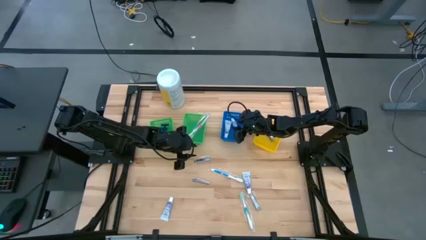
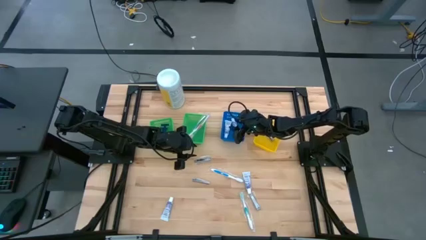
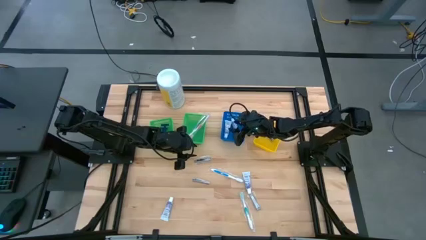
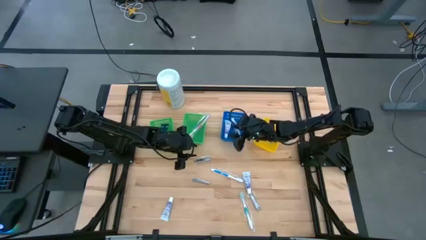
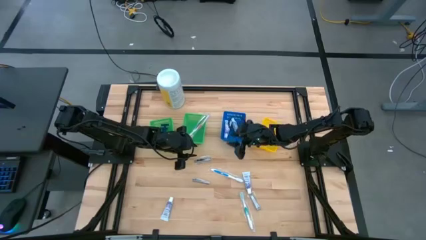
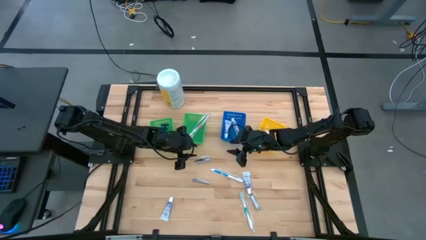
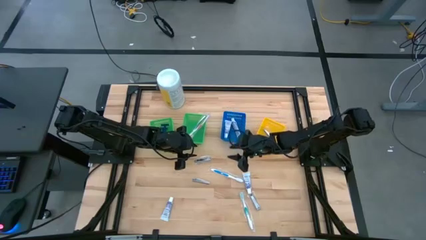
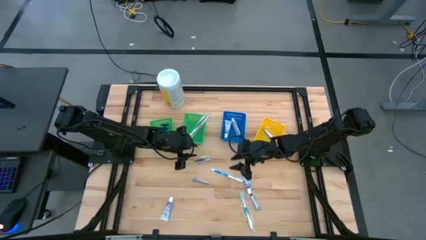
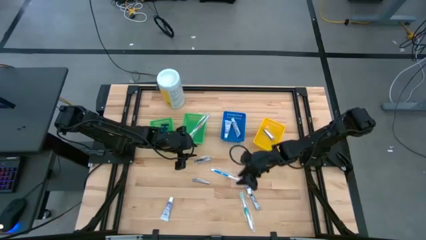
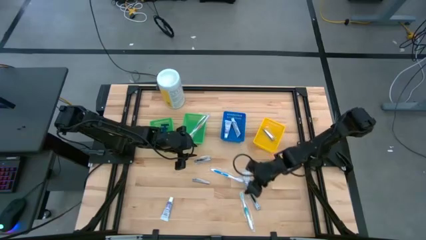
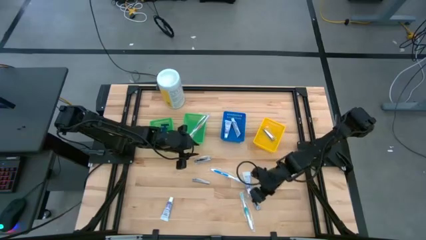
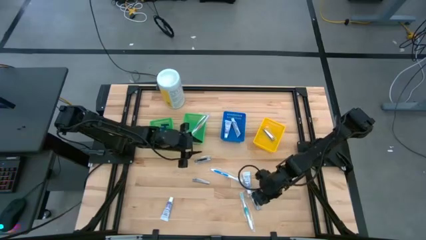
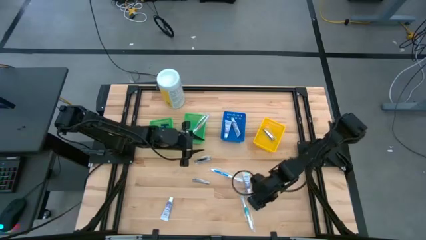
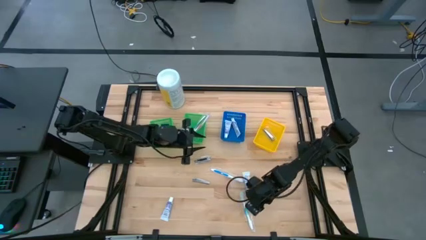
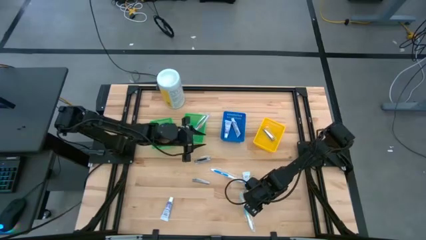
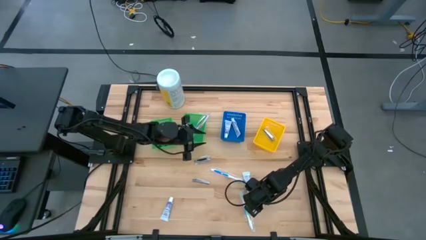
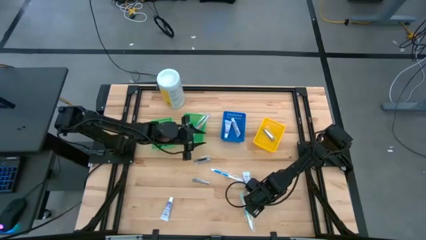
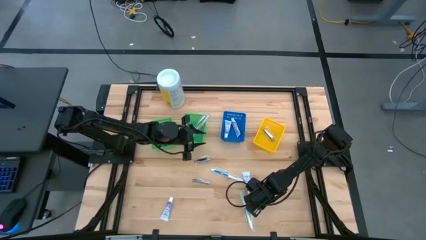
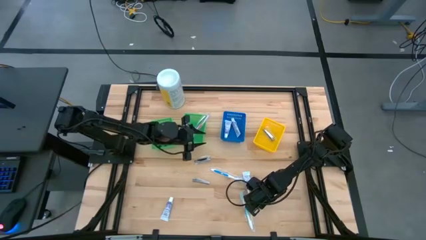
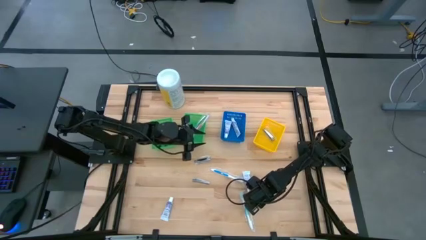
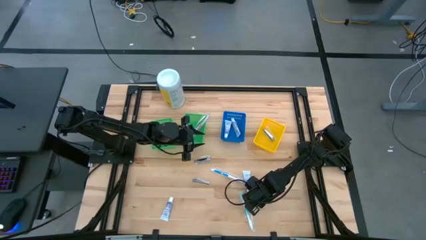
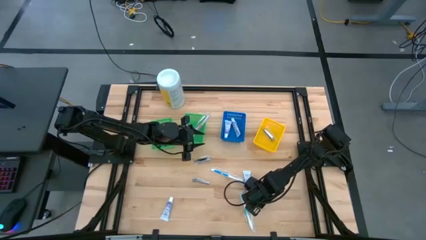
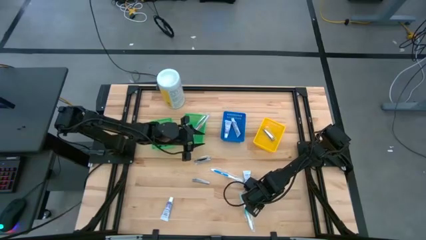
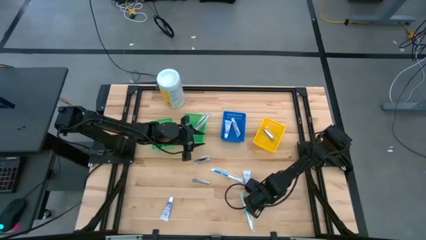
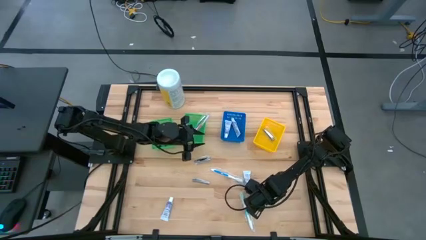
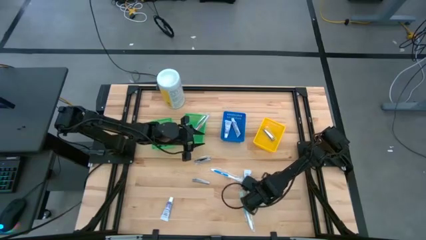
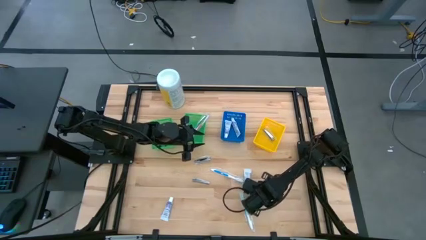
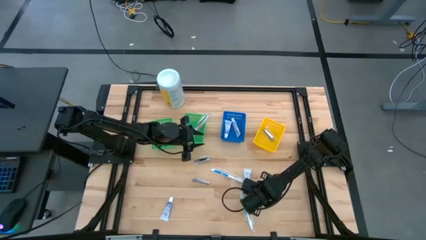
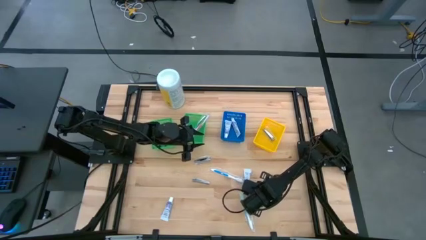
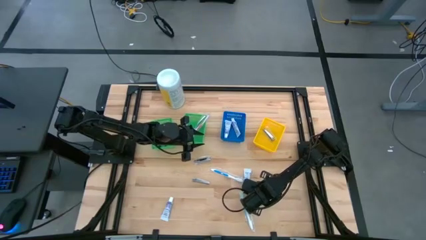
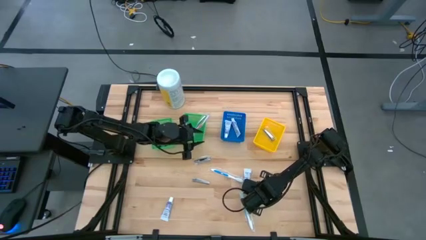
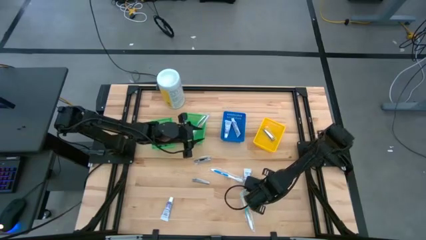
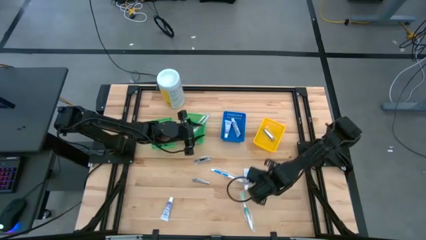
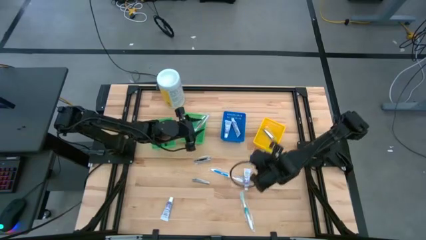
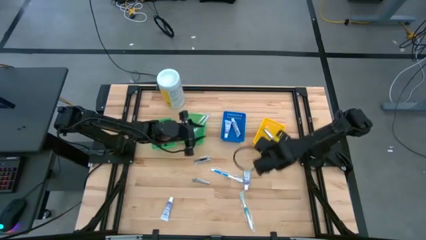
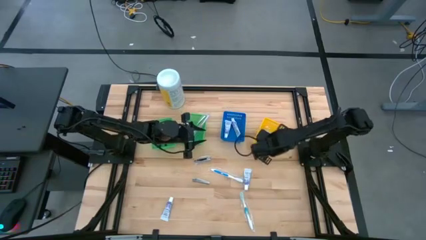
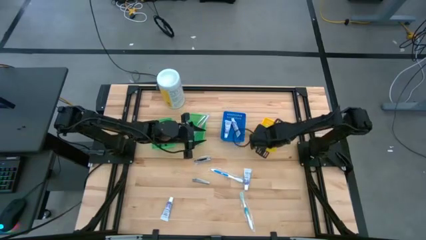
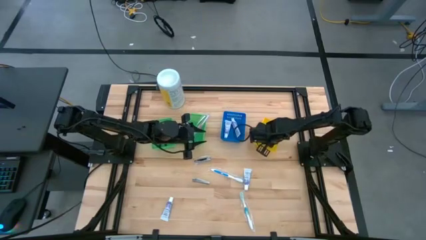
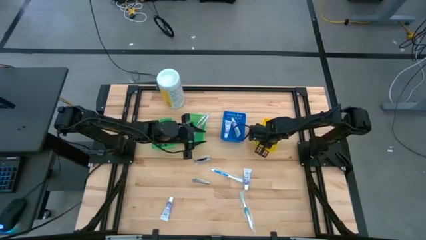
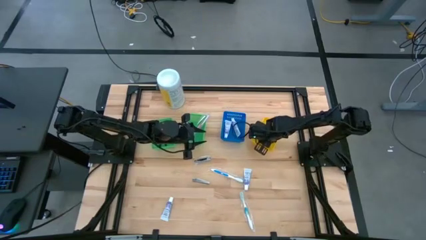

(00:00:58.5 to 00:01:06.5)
Task: Pick & Place Travel size toiletries
Put the silver nail cutter into the yellow bin

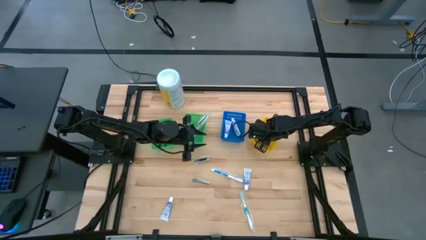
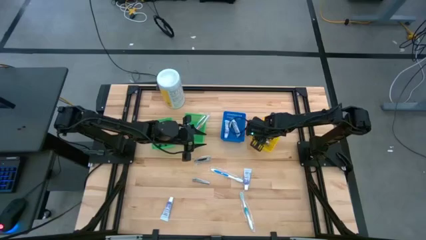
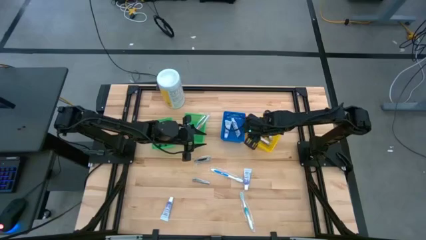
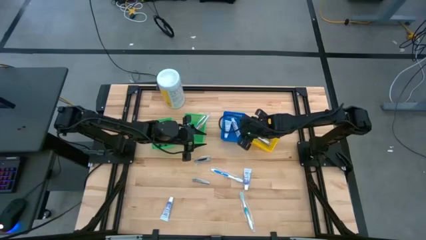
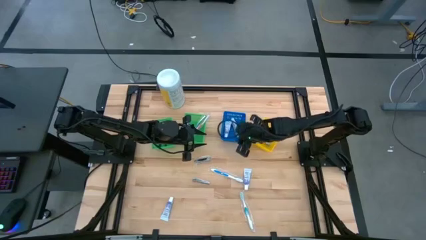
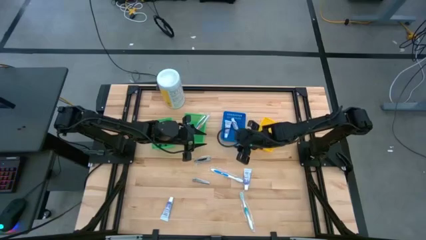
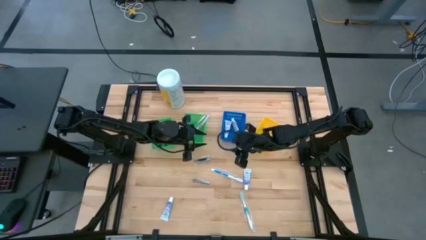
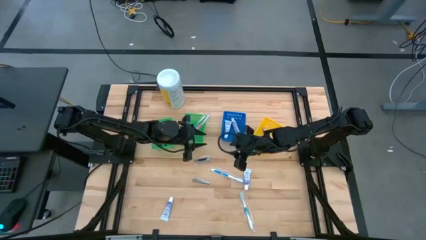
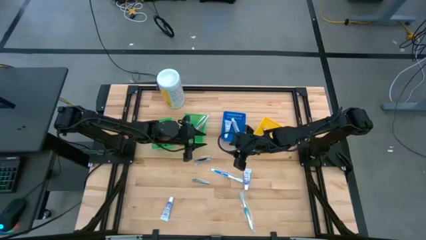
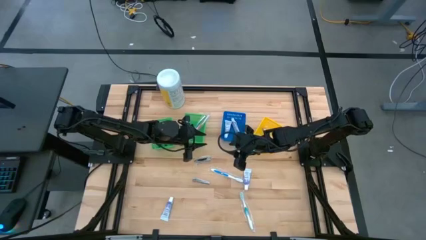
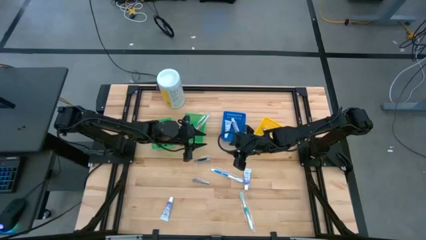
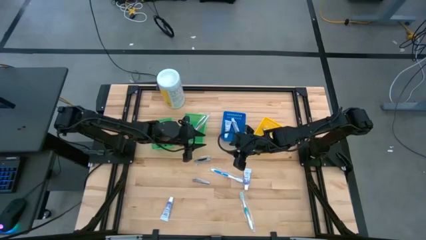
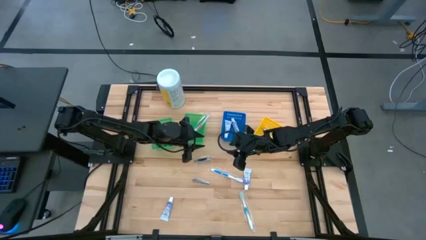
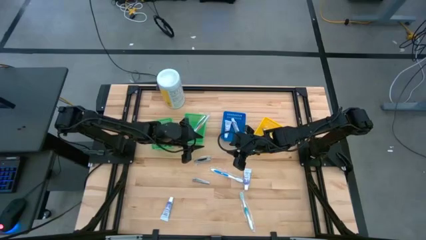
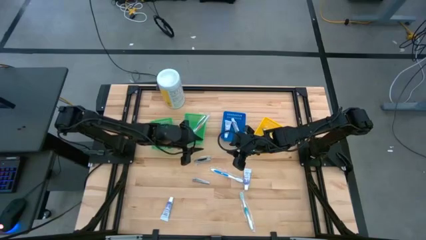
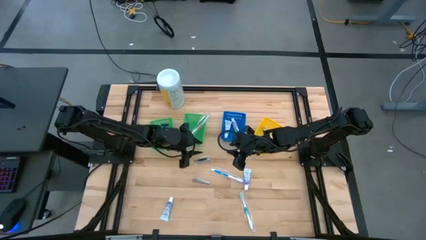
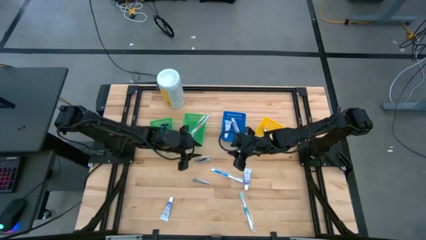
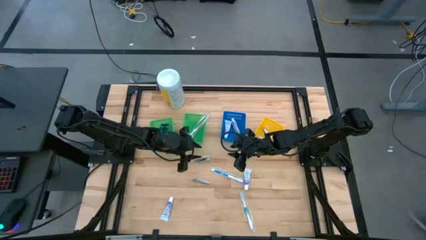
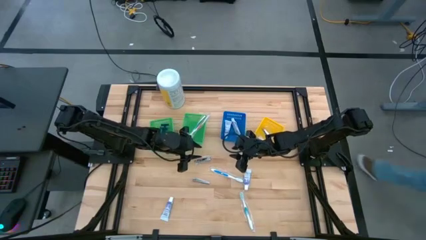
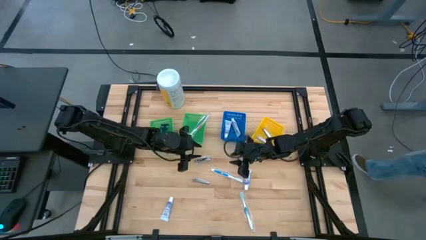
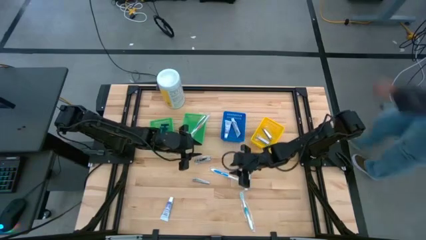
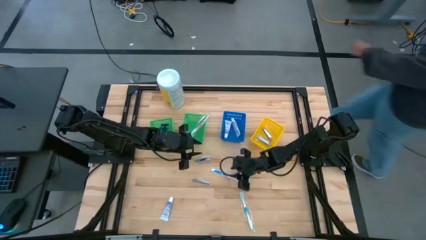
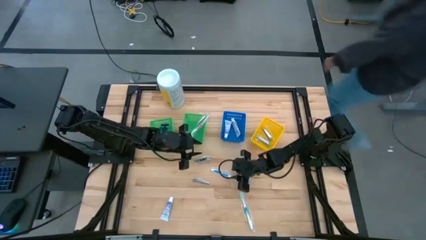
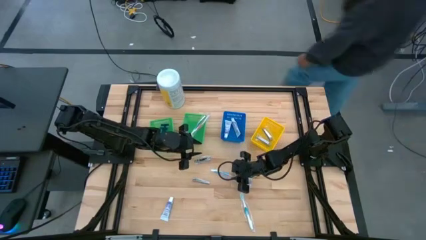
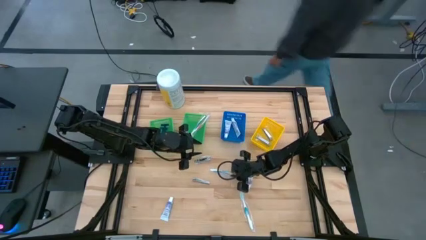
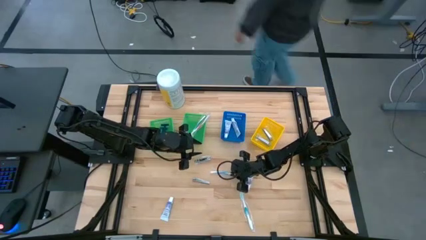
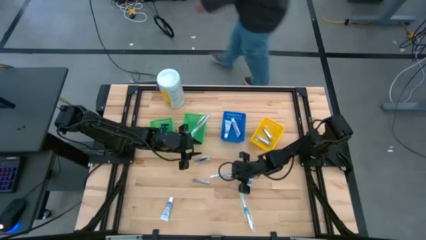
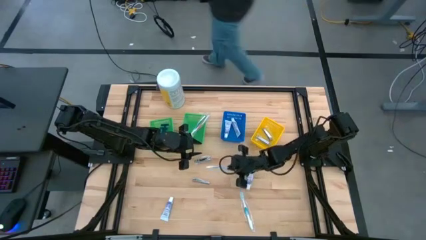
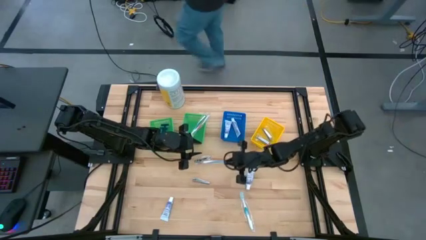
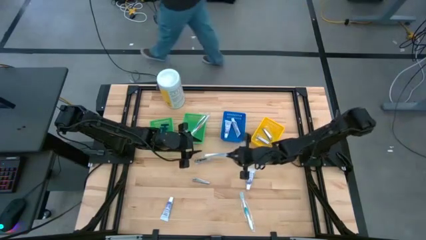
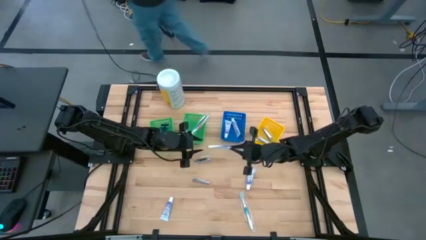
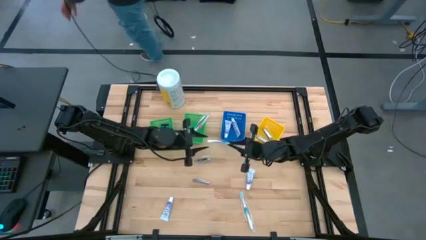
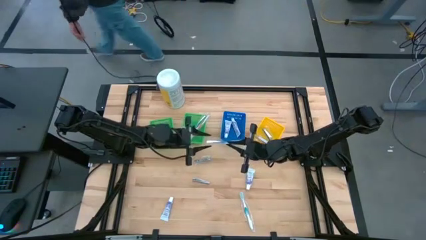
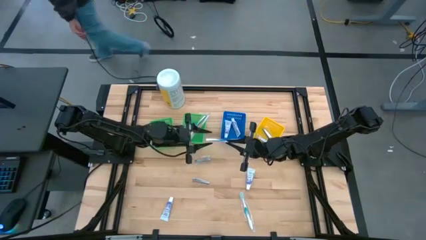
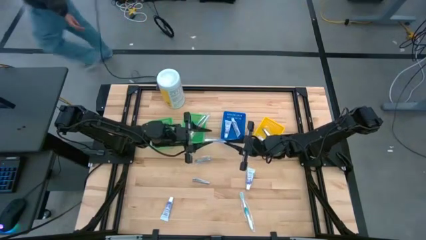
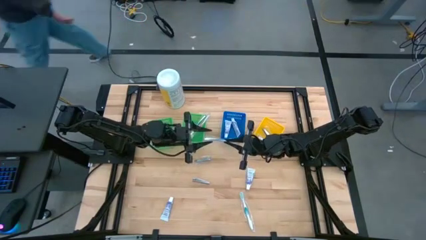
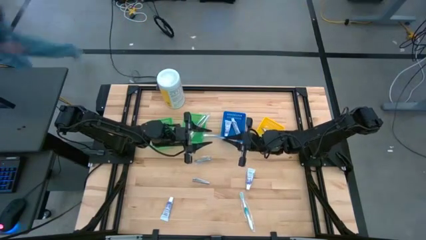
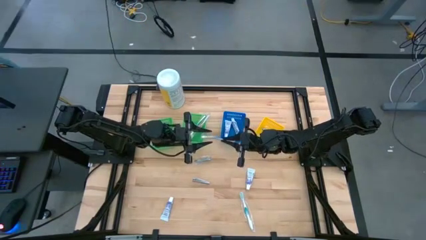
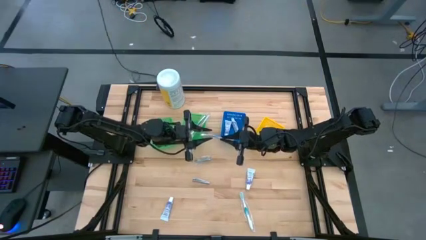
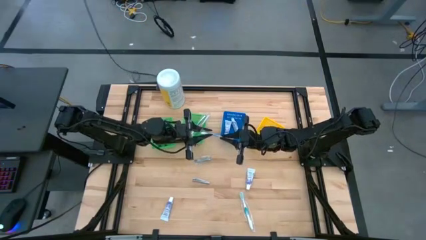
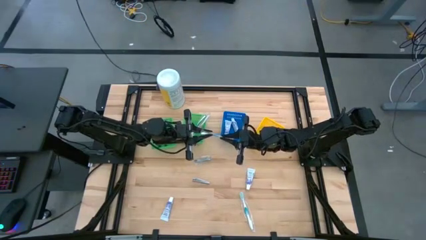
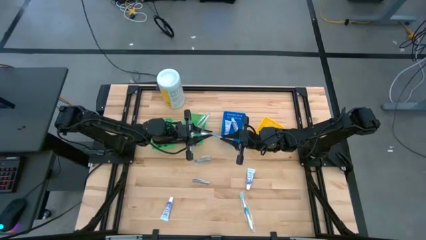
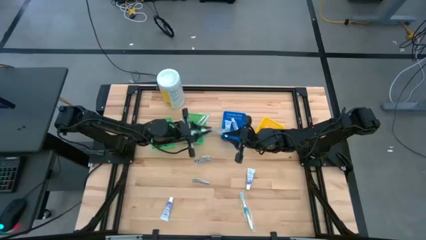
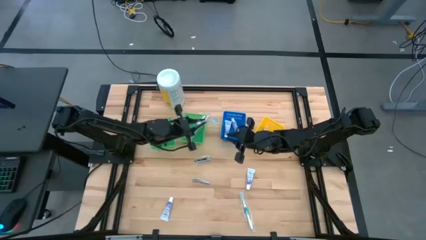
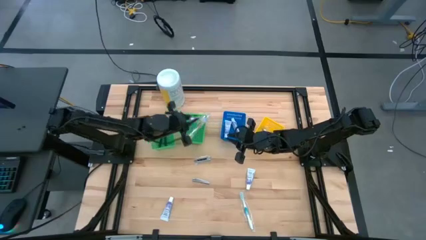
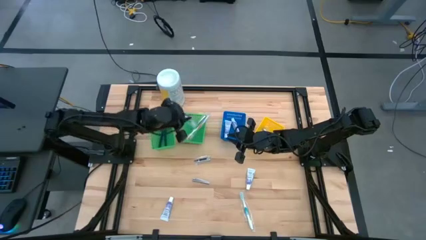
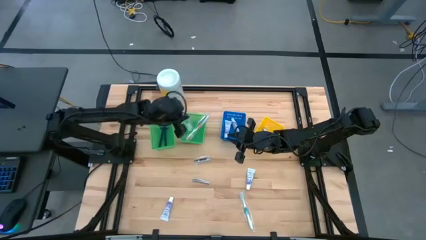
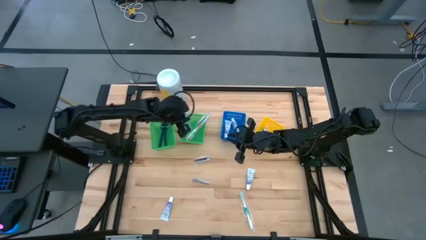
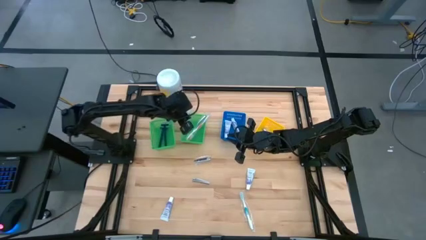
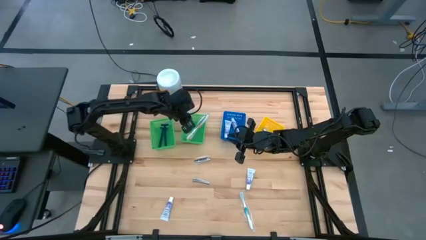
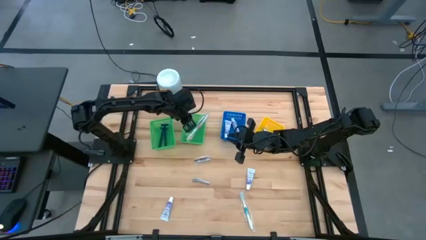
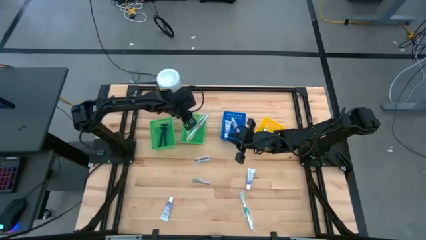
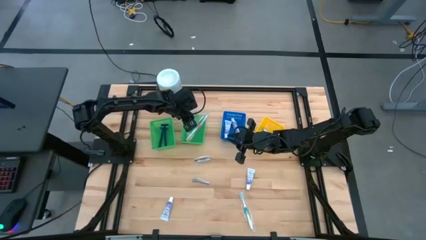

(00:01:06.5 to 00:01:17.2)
Put the blue toothbrush into the right green bin
